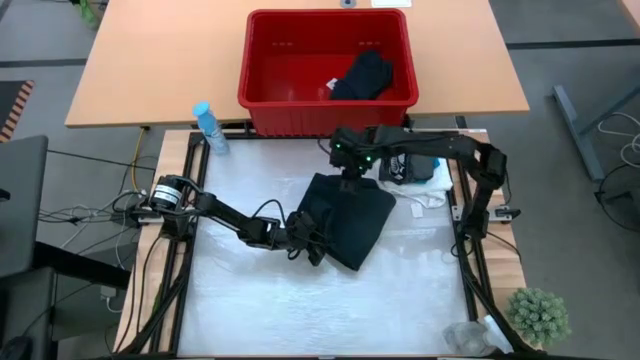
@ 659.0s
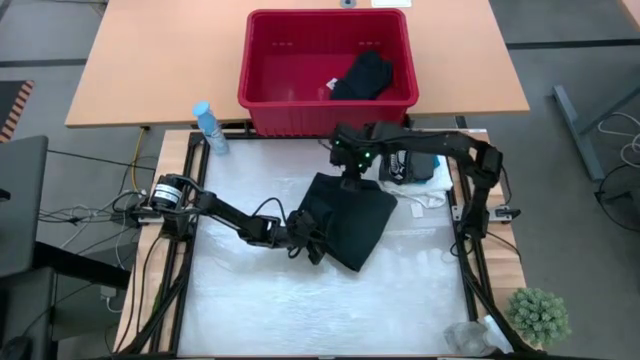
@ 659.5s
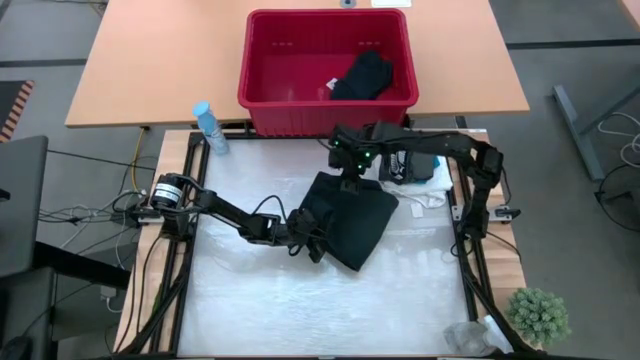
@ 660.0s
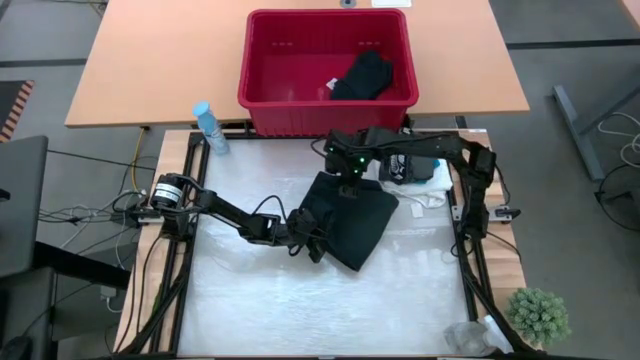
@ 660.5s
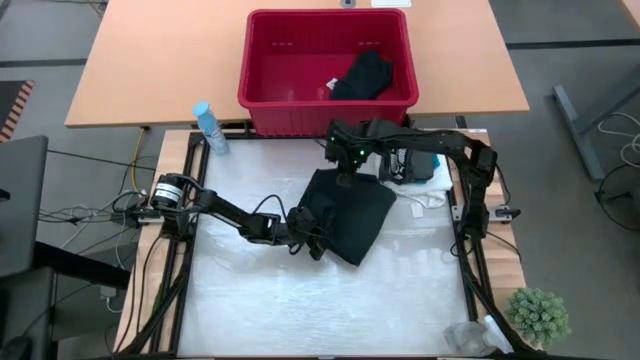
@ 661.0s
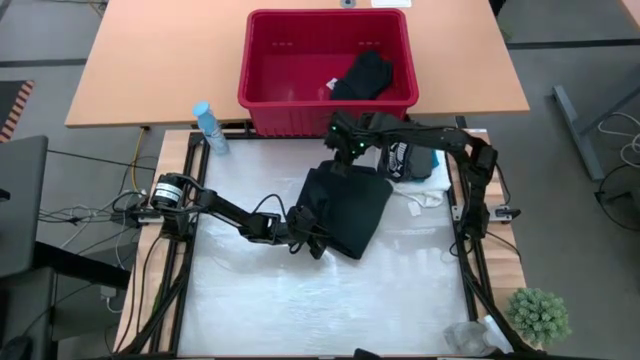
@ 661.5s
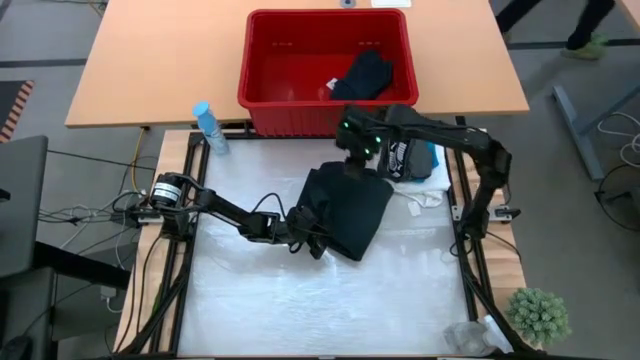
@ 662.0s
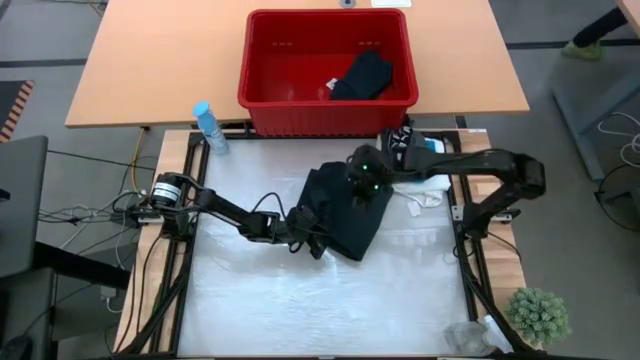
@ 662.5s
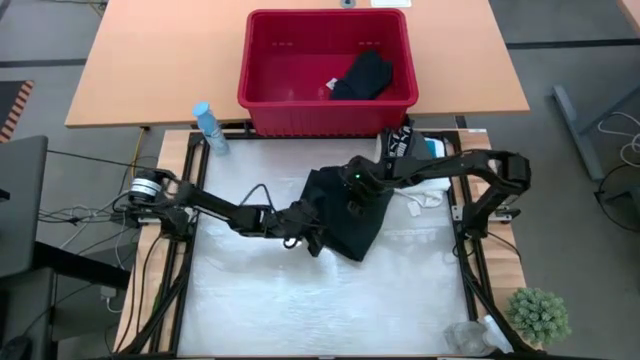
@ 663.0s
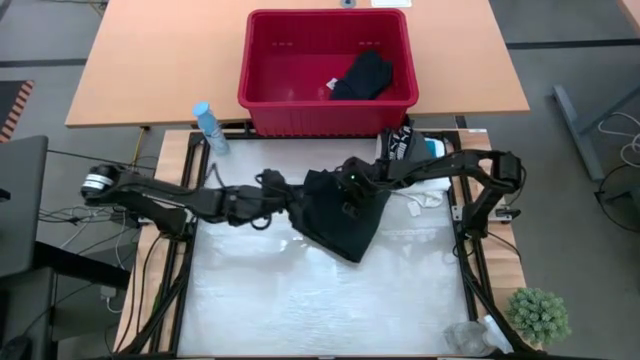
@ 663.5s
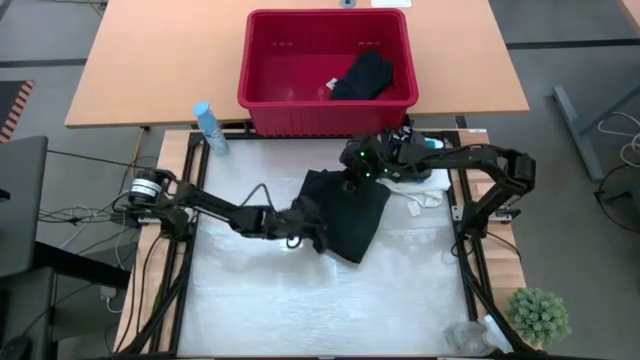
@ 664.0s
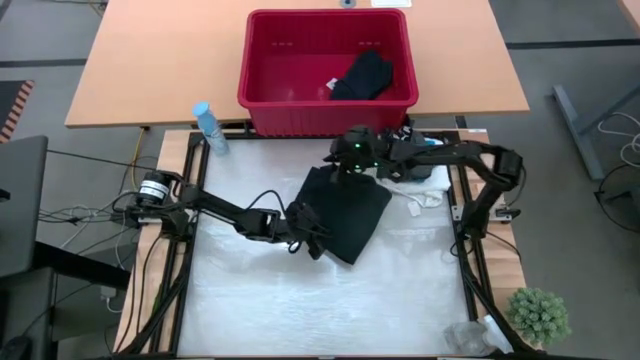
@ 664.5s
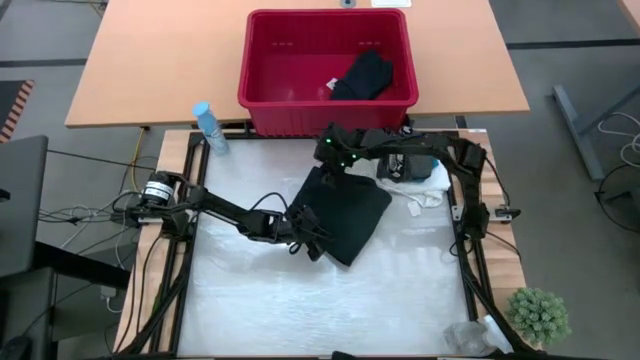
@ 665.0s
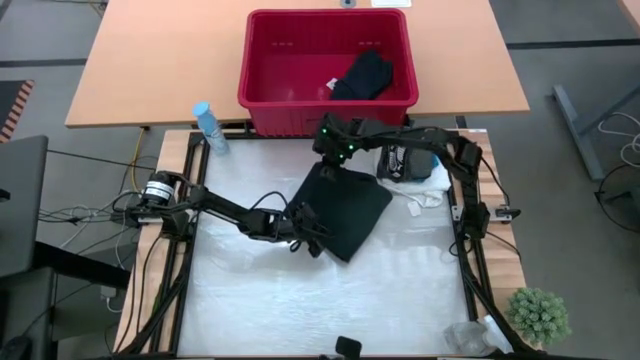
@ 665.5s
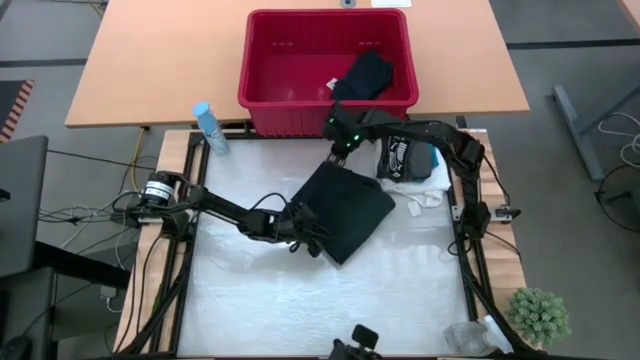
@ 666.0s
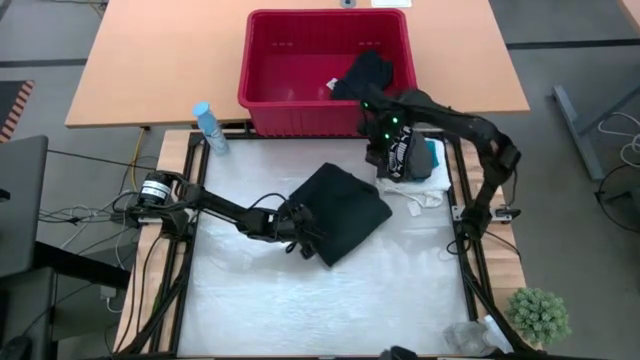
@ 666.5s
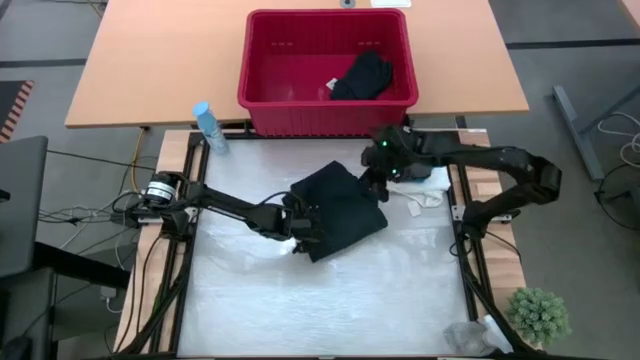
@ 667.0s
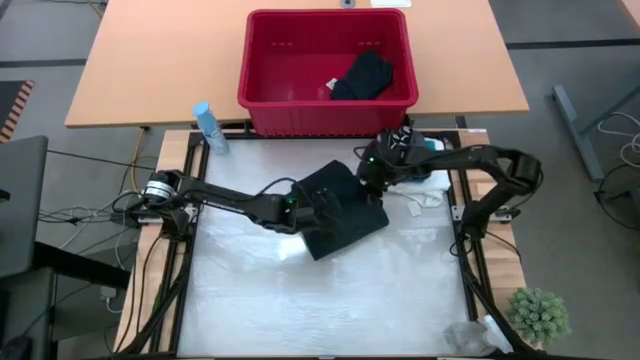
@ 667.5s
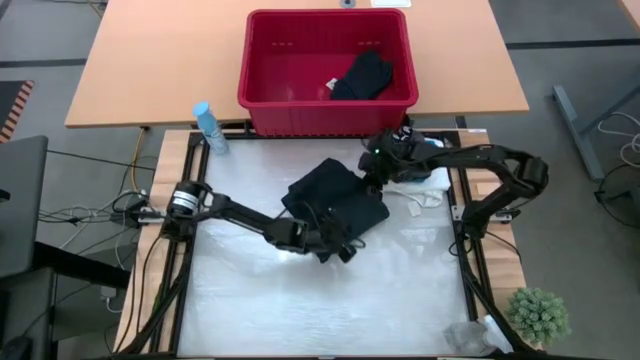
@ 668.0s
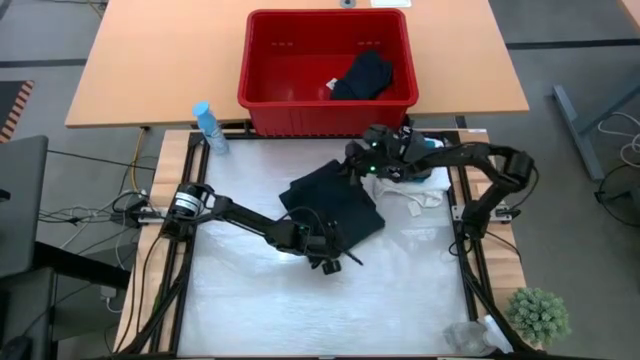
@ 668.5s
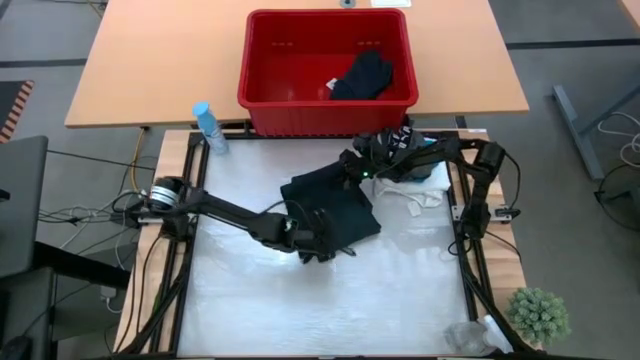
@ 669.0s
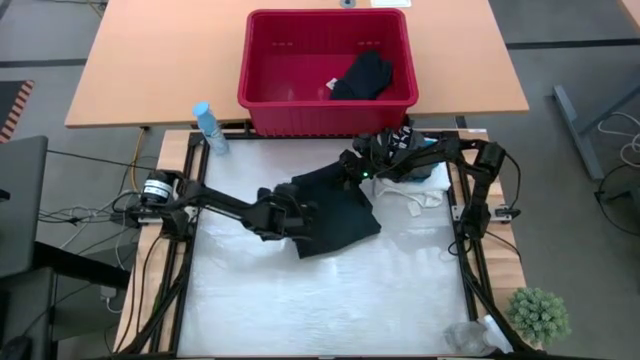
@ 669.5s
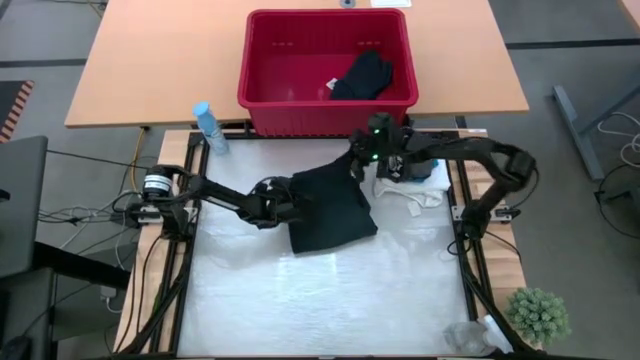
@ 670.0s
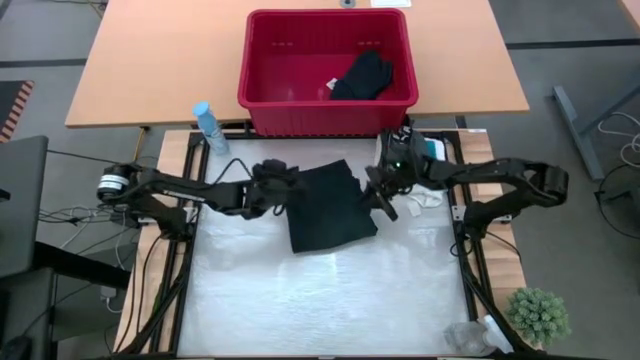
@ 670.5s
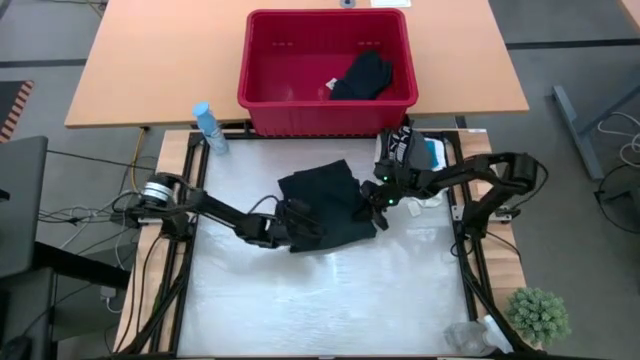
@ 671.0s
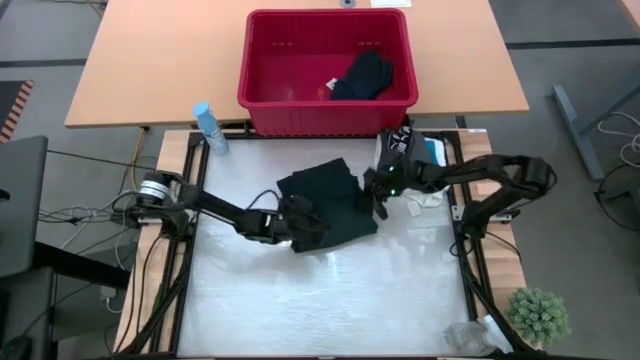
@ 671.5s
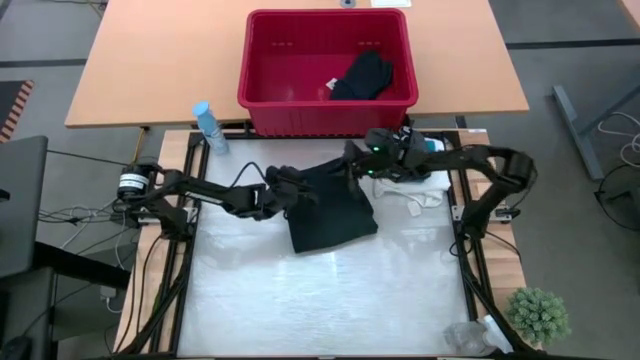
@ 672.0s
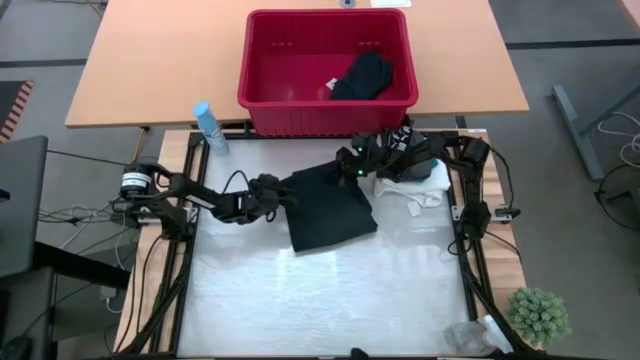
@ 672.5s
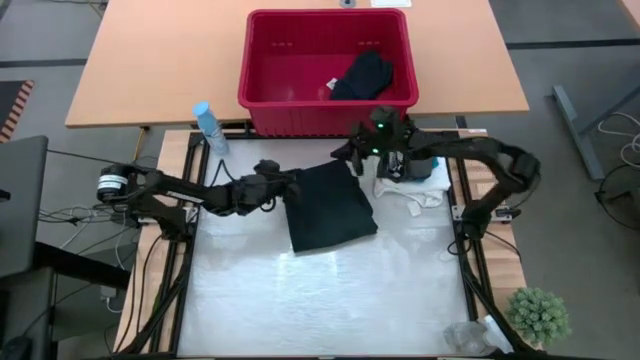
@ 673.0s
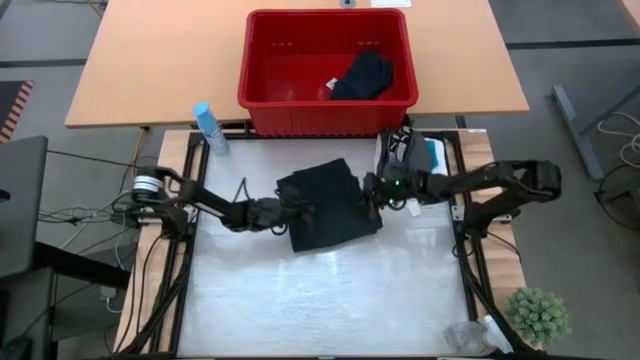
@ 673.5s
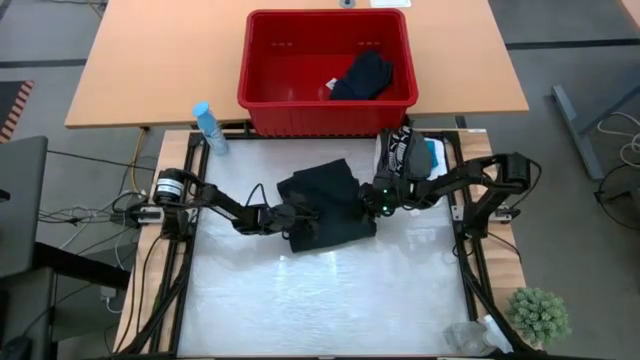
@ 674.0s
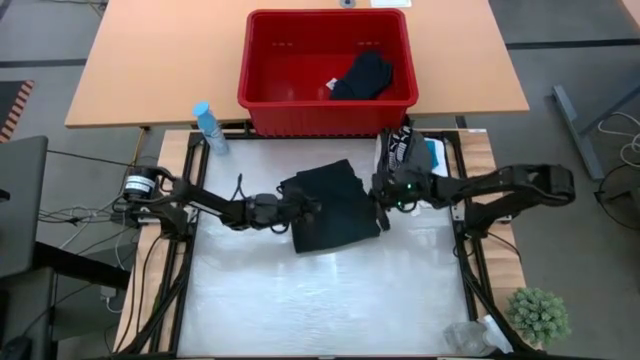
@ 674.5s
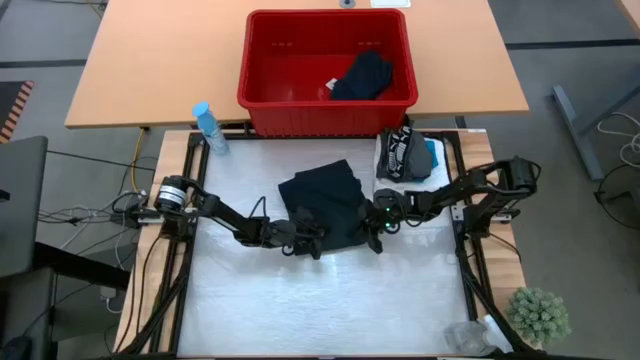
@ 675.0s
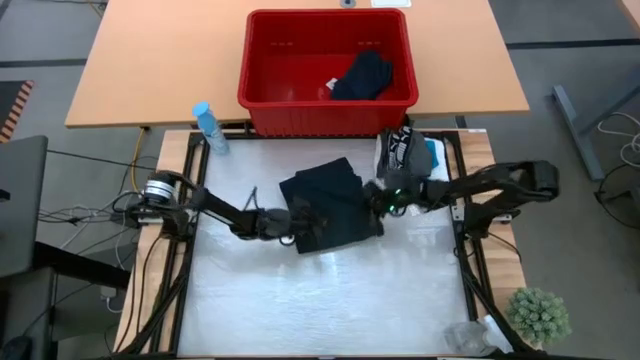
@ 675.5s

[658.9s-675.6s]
Task: Fold laundry
Fold the blue pants

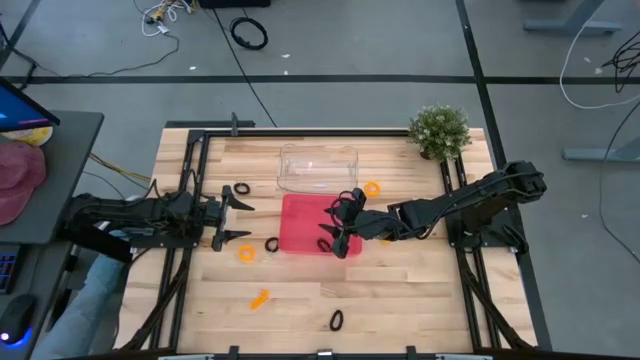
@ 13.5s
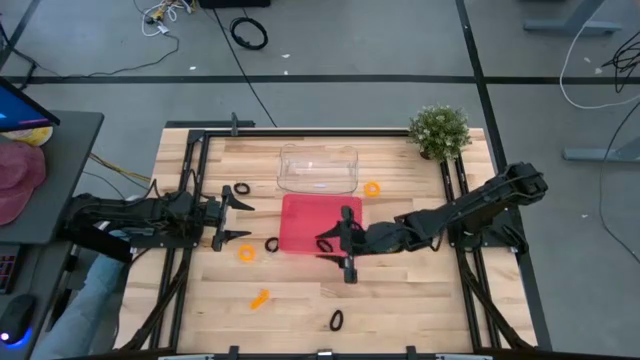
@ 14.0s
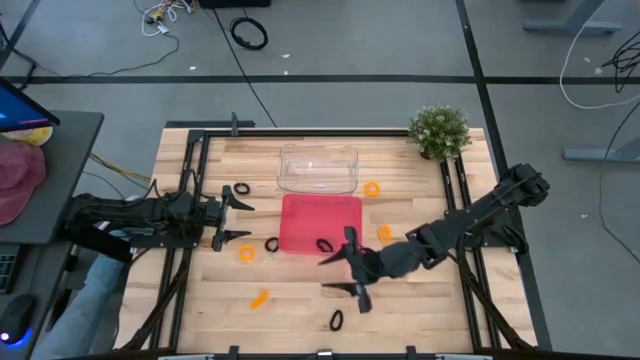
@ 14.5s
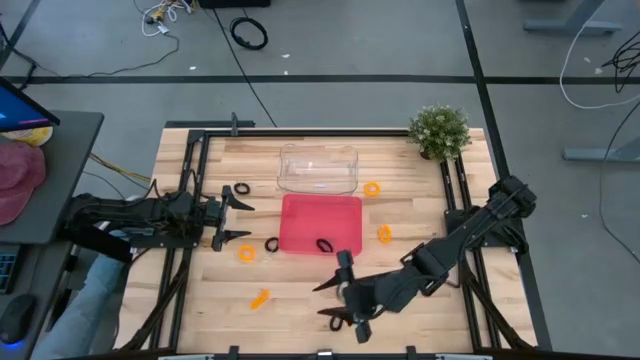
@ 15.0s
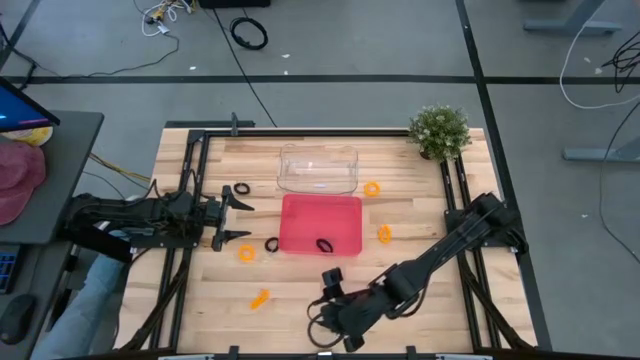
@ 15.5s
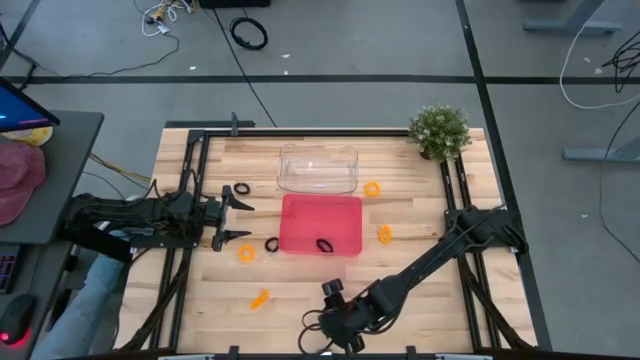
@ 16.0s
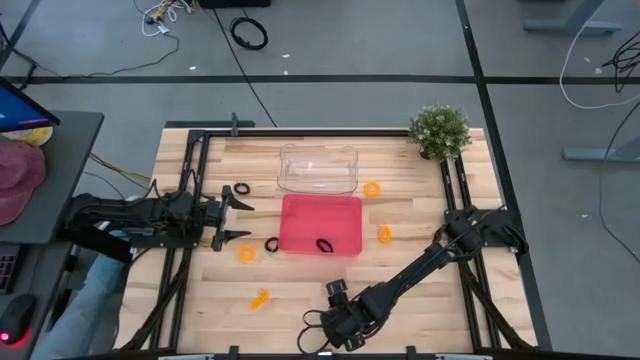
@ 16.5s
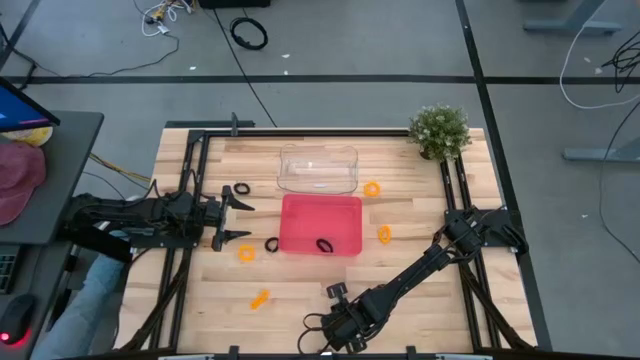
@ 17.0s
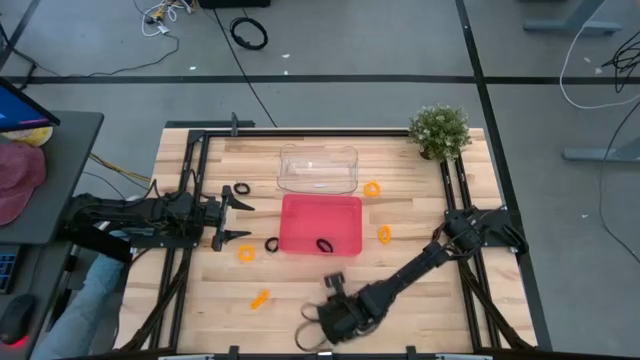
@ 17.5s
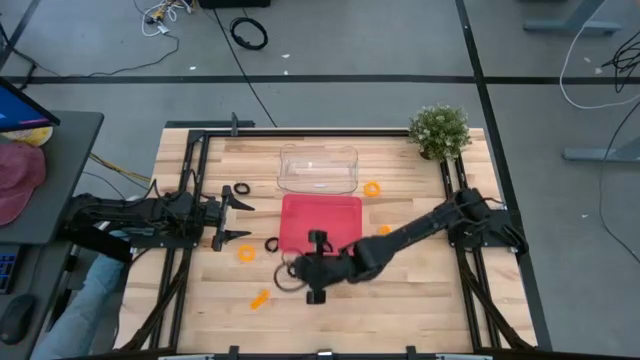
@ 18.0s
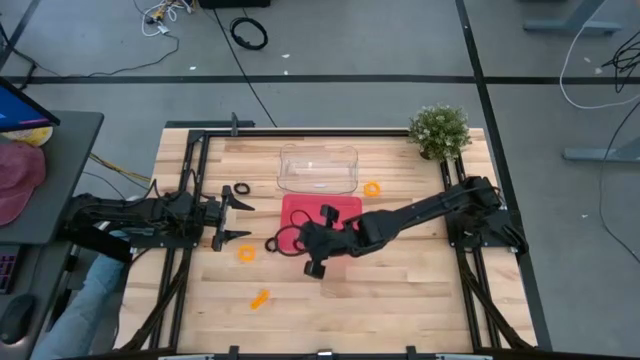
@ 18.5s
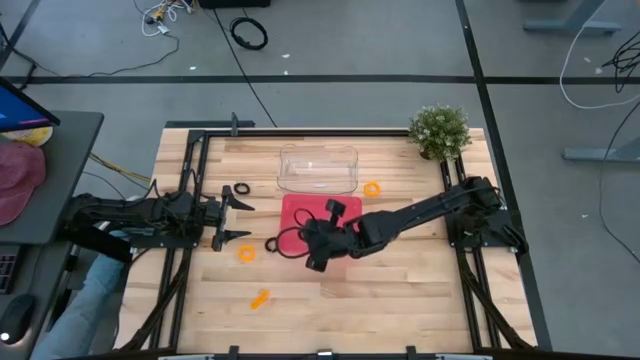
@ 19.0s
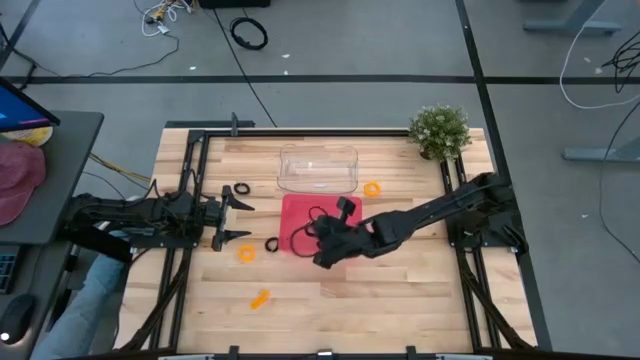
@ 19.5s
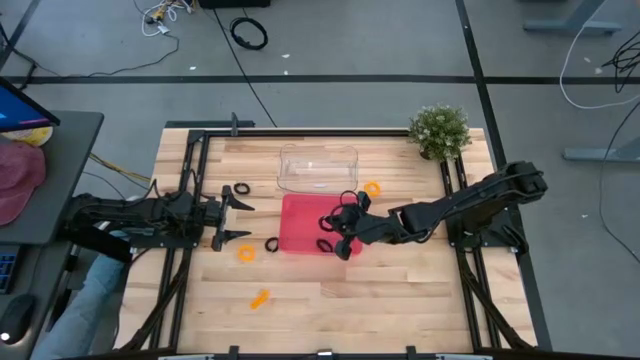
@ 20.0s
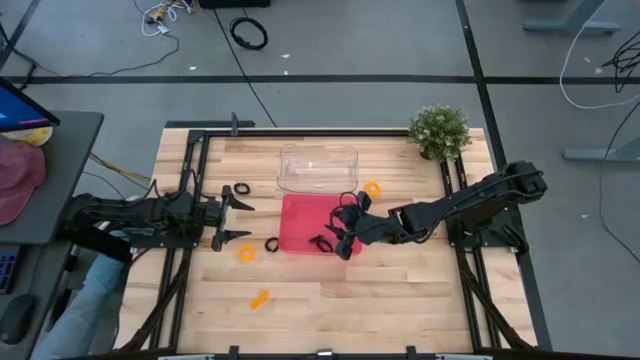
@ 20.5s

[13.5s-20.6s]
Task: Sort spring keychains
Put the black spring keychain into the red bin
